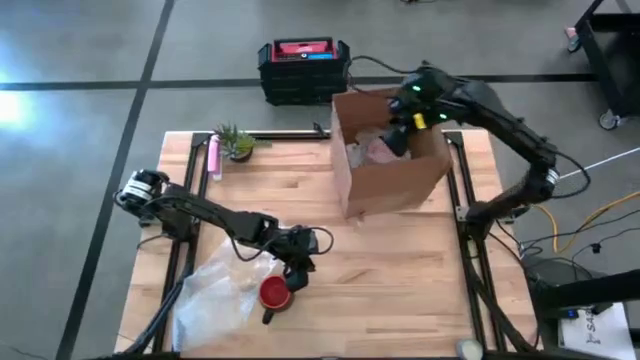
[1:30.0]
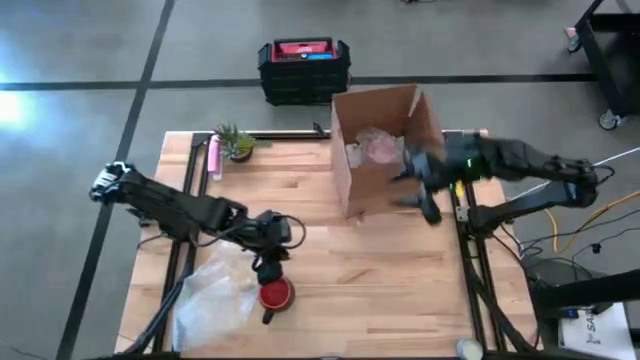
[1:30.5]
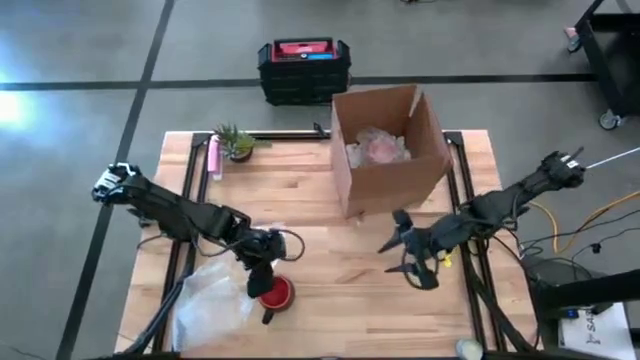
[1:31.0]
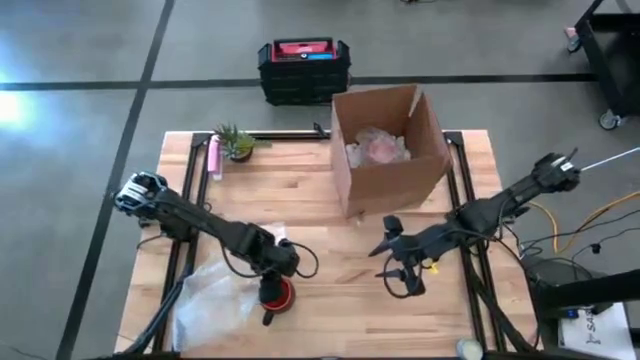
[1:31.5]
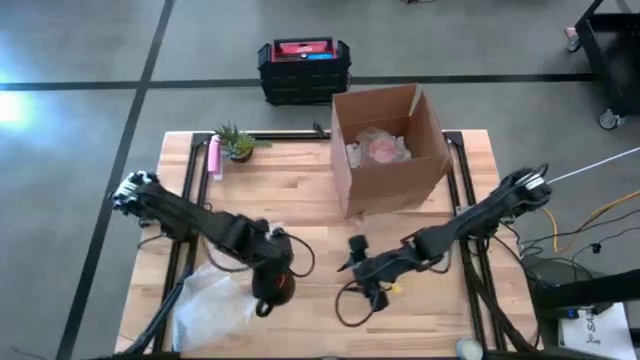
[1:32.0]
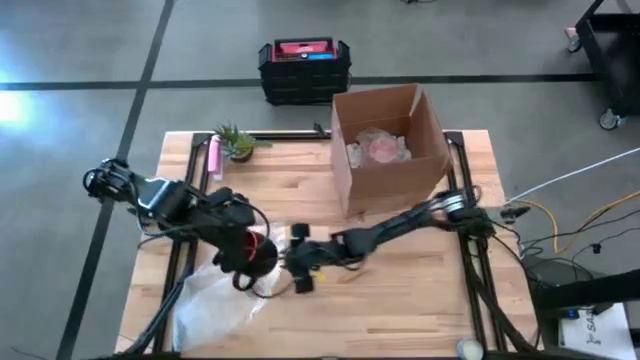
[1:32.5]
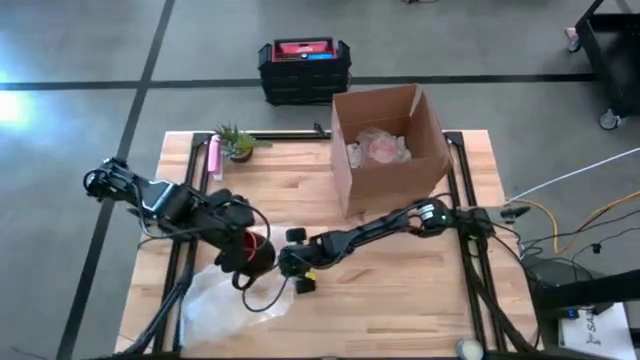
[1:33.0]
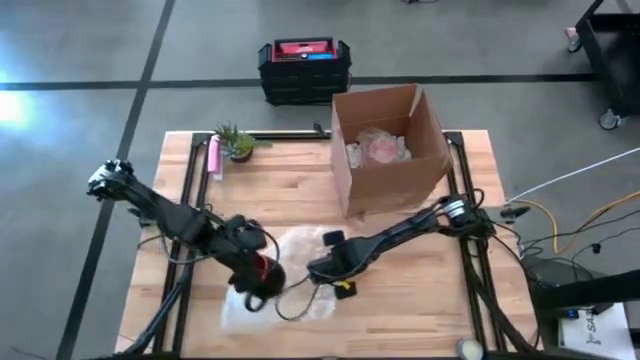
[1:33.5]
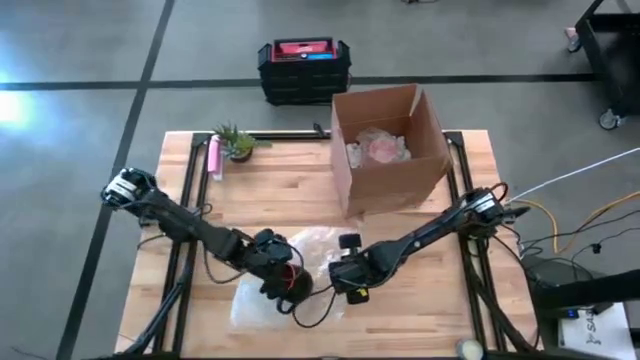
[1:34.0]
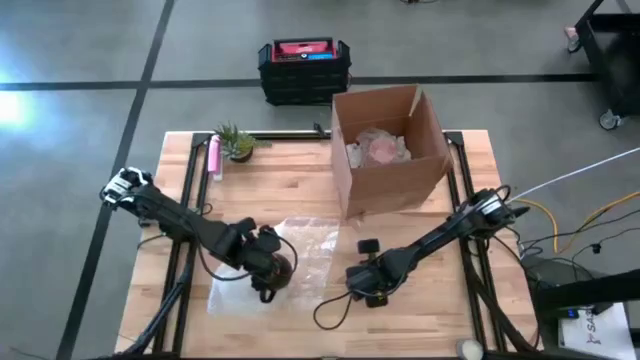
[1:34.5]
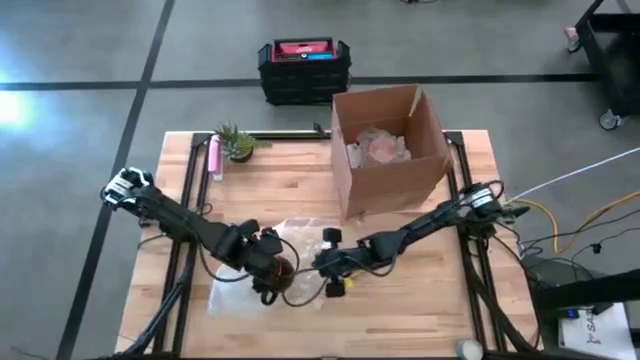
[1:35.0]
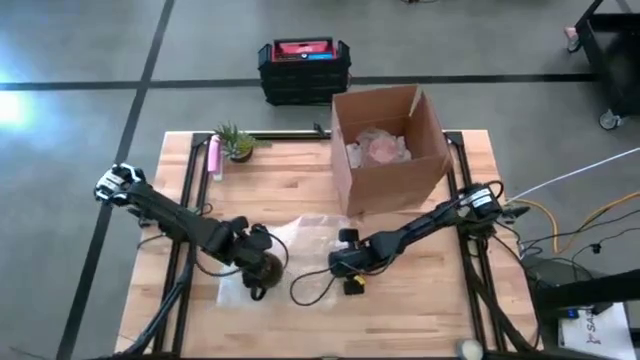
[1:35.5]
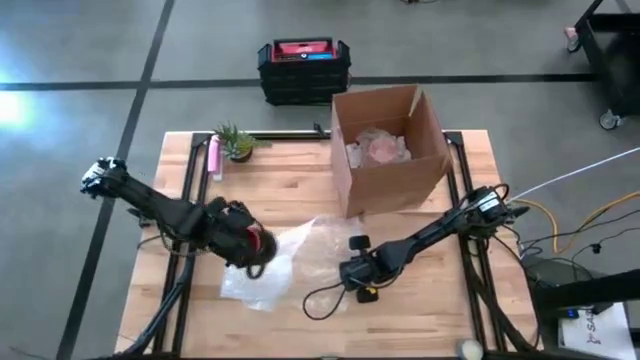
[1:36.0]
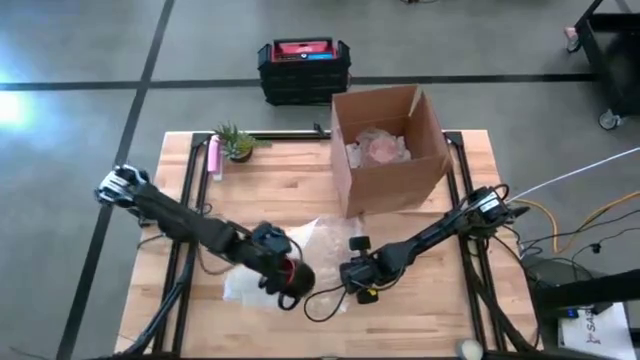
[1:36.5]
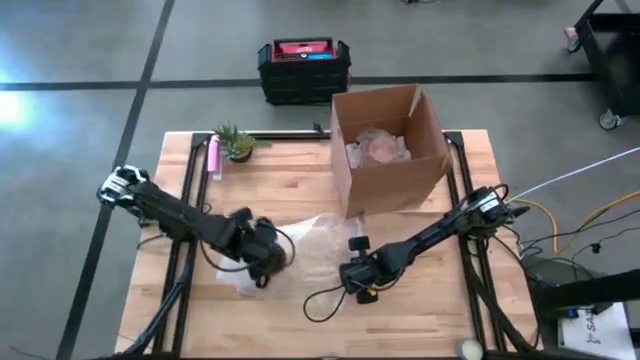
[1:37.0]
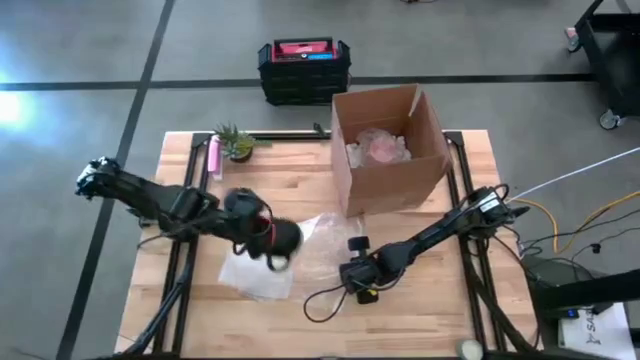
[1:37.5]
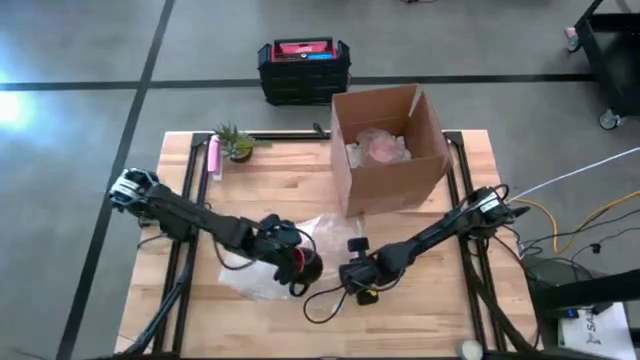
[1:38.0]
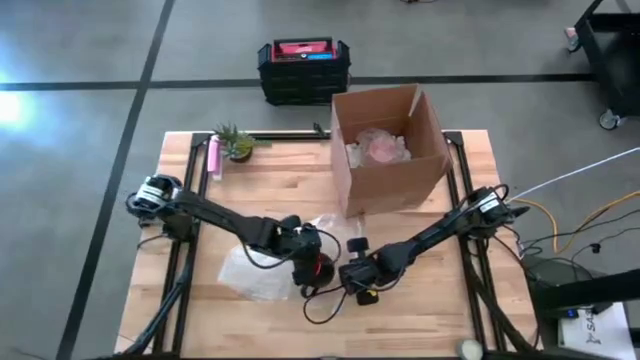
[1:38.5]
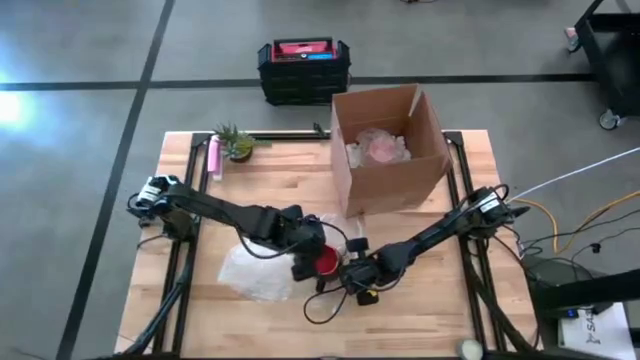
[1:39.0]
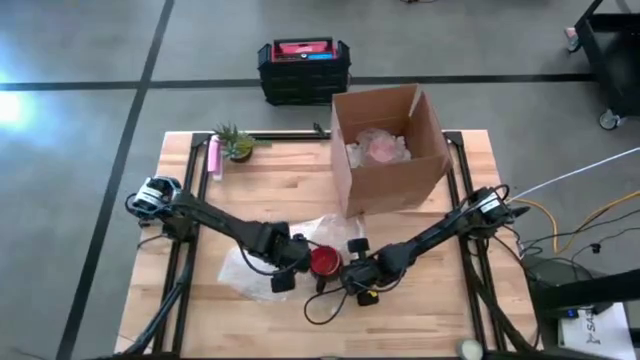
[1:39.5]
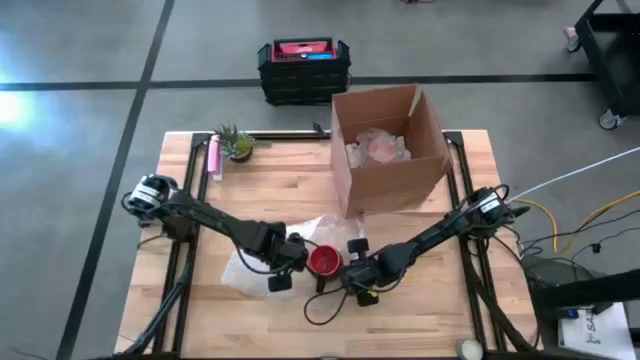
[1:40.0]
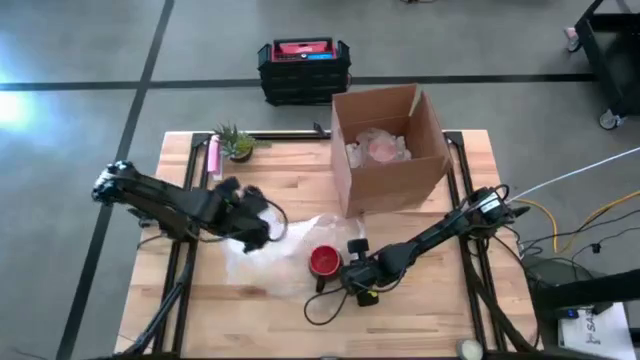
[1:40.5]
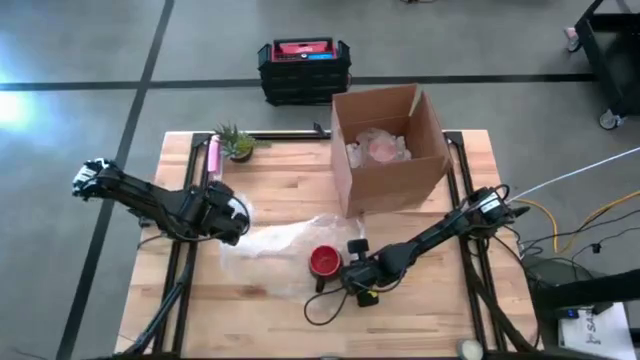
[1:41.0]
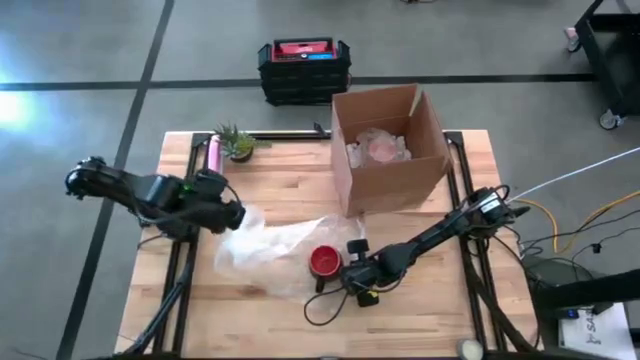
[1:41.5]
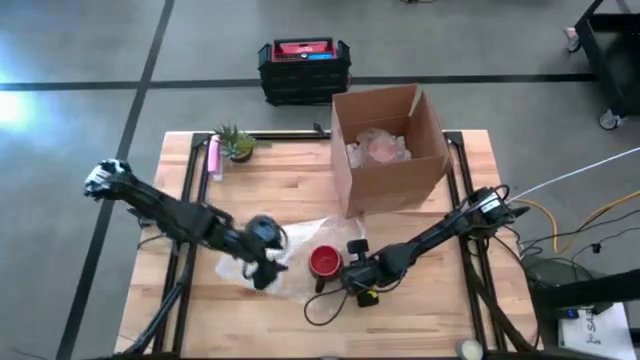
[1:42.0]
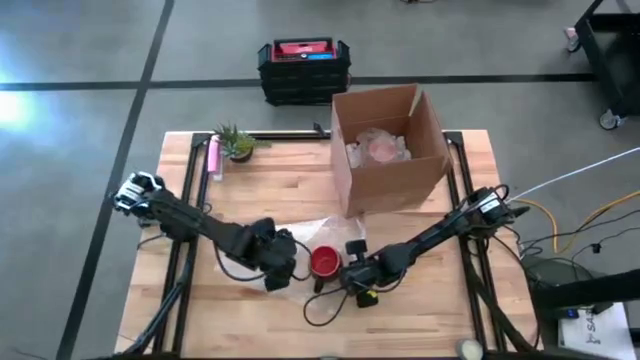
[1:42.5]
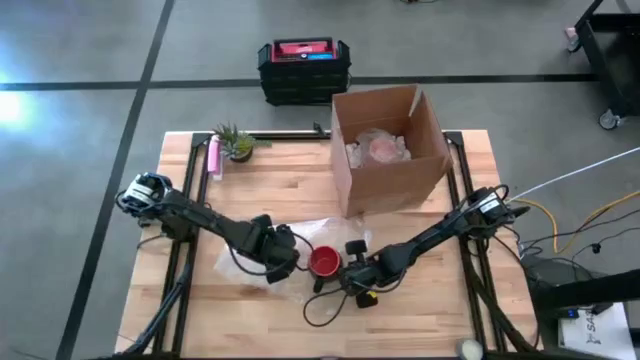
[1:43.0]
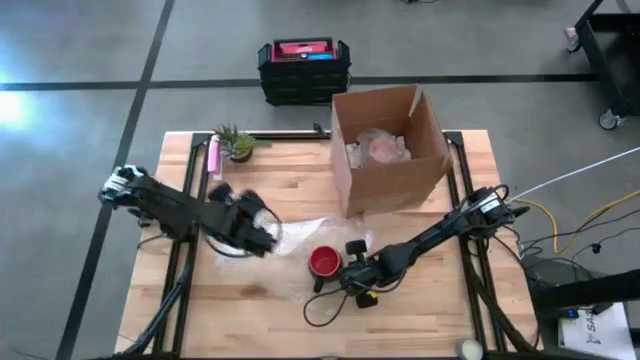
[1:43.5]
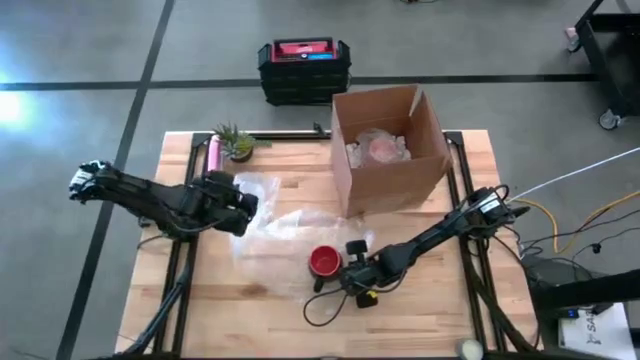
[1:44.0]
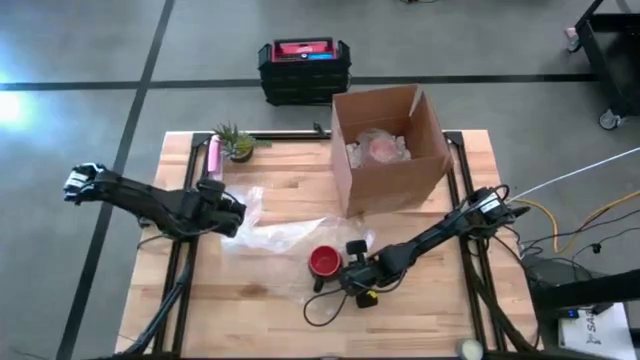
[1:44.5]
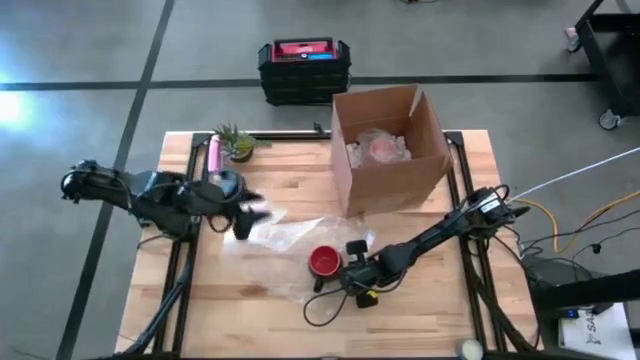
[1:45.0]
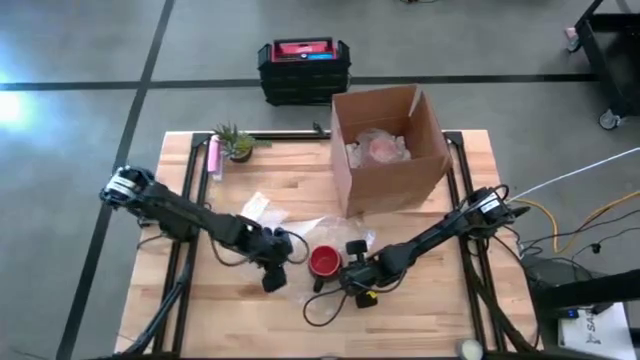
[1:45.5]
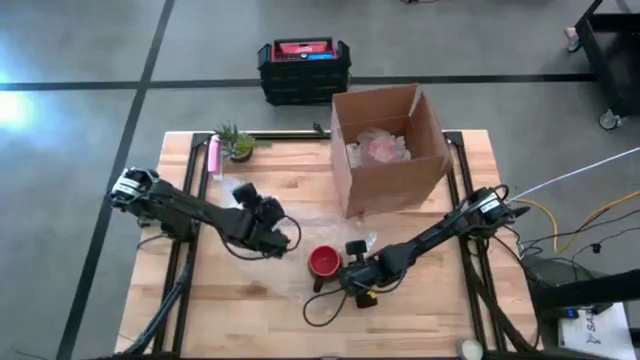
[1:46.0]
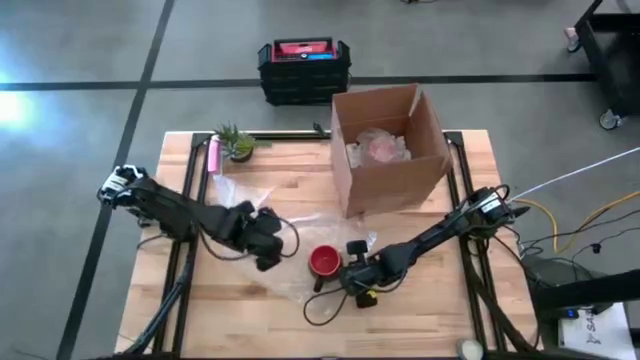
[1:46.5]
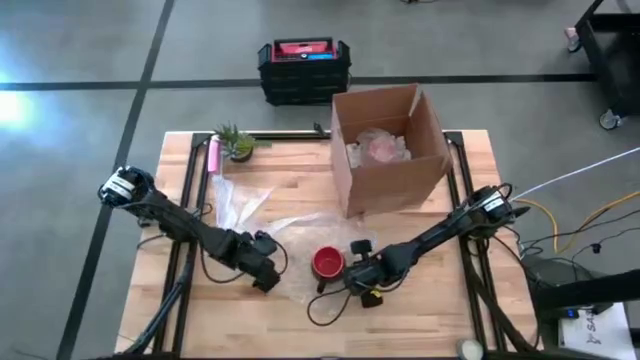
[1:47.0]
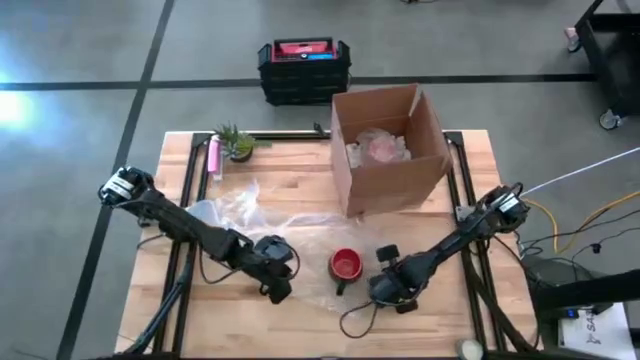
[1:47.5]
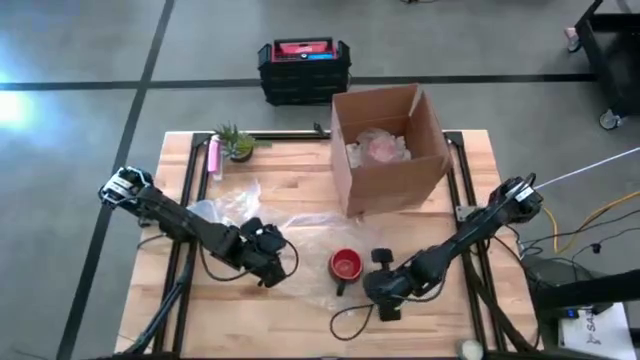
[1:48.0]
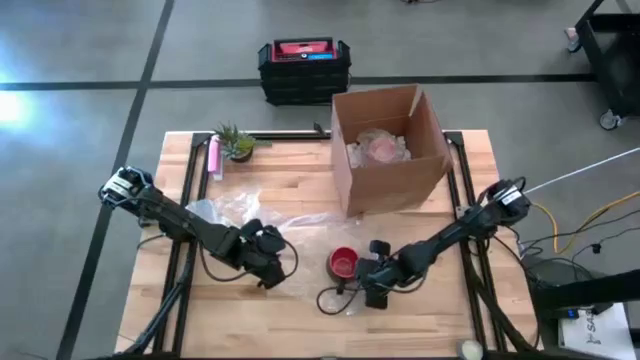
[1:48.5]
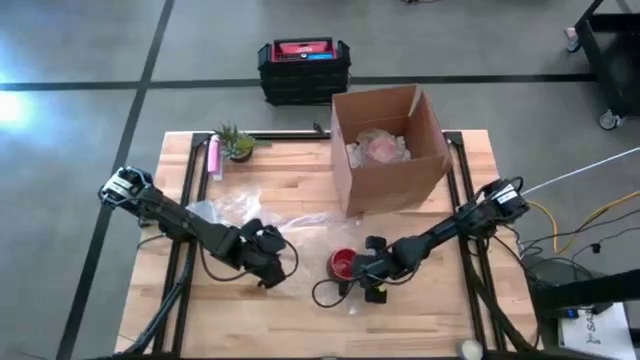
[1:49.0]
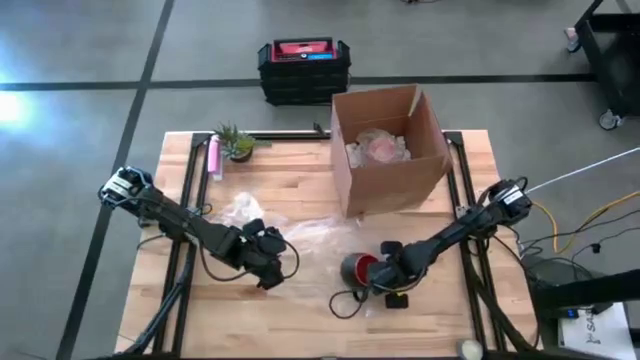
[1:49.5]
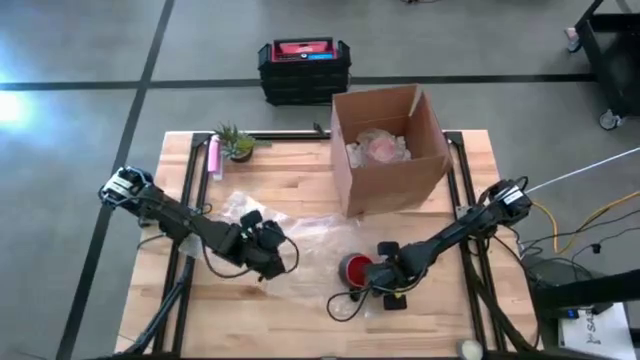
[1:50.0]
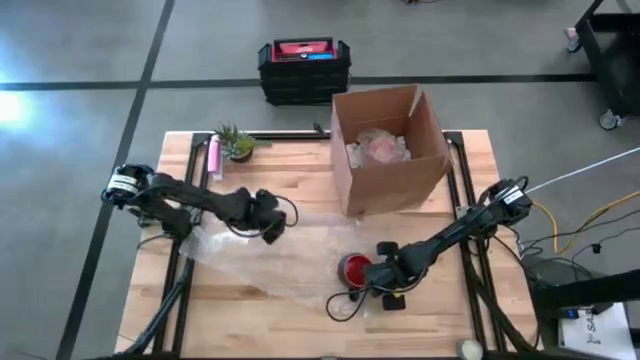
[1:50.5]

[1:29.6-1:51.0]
Task: wrap mug
Wrap the black mug with transparent bubble wrap
